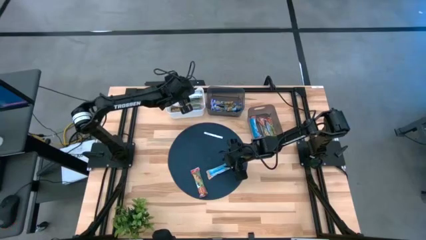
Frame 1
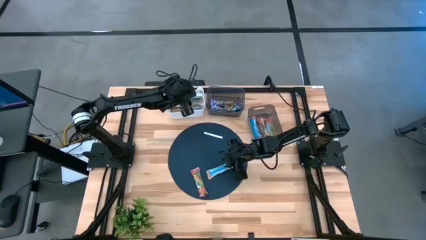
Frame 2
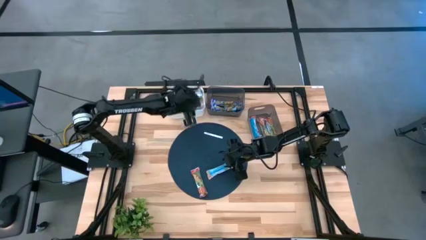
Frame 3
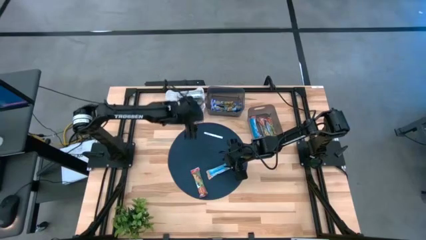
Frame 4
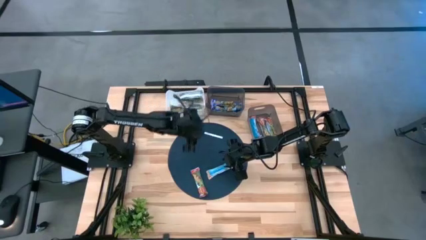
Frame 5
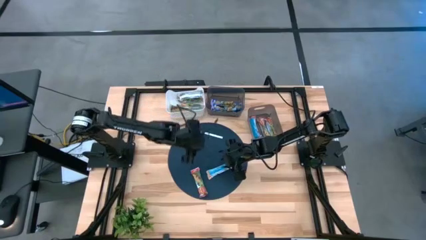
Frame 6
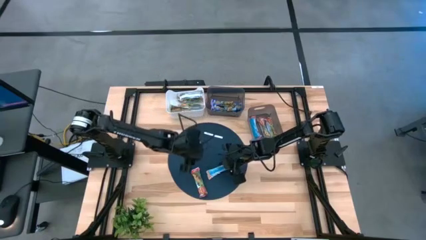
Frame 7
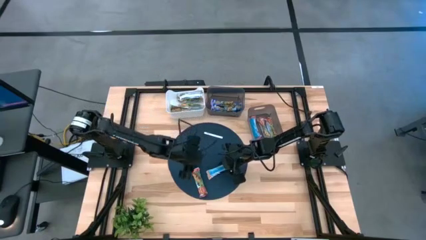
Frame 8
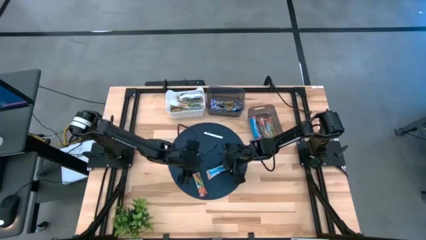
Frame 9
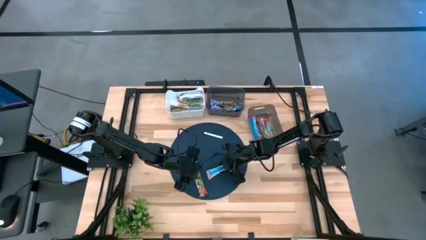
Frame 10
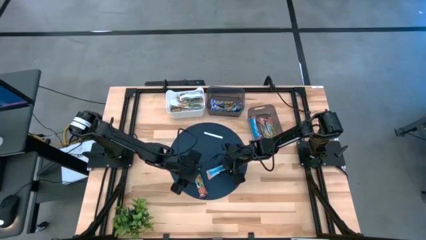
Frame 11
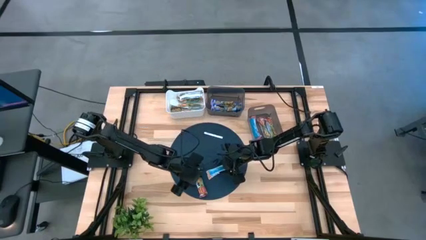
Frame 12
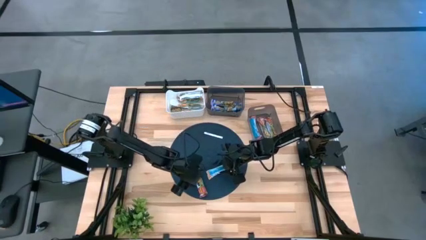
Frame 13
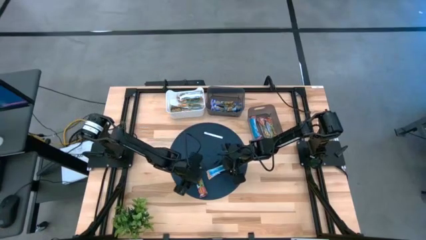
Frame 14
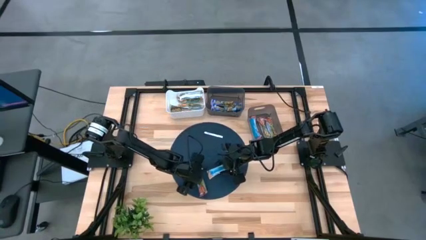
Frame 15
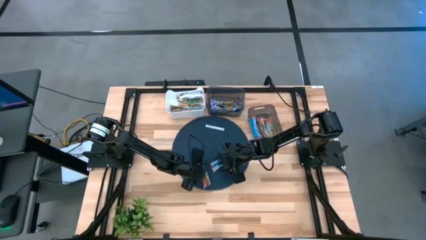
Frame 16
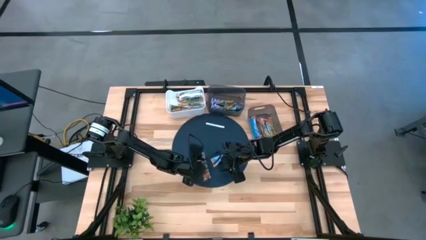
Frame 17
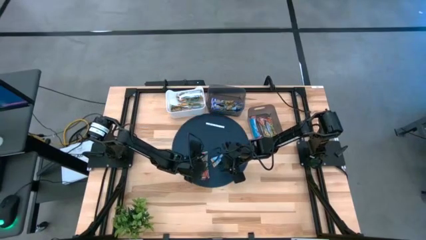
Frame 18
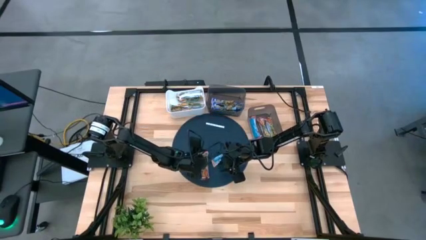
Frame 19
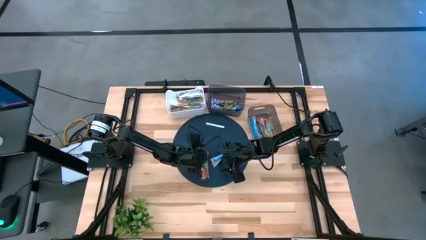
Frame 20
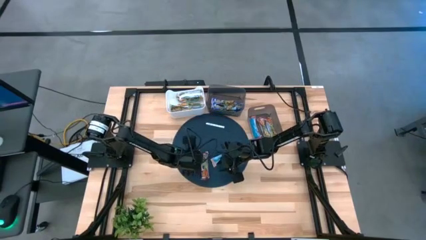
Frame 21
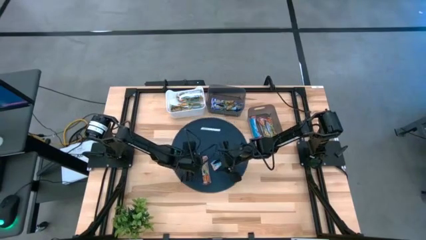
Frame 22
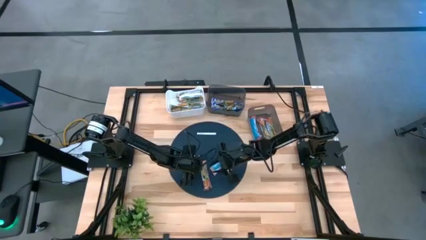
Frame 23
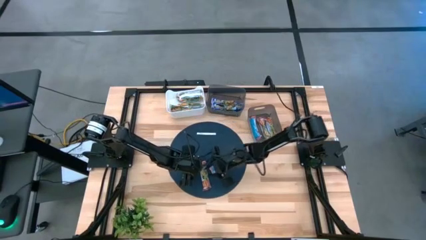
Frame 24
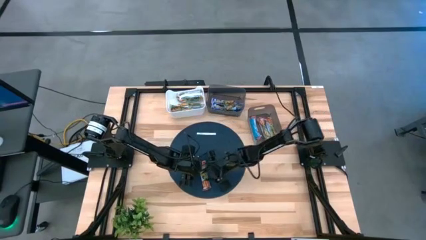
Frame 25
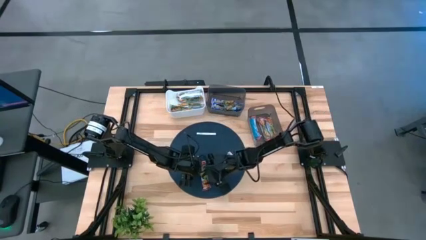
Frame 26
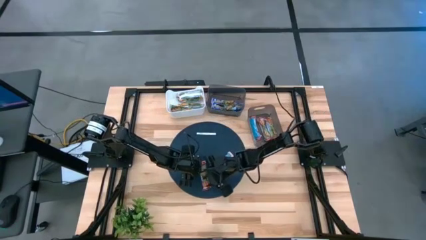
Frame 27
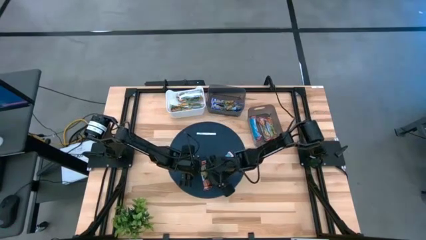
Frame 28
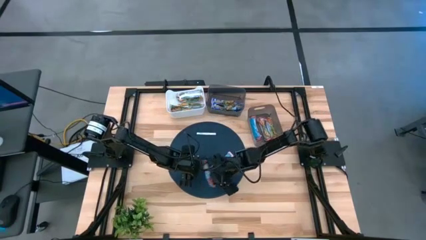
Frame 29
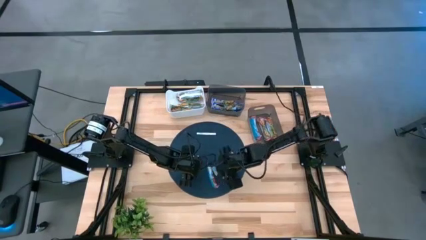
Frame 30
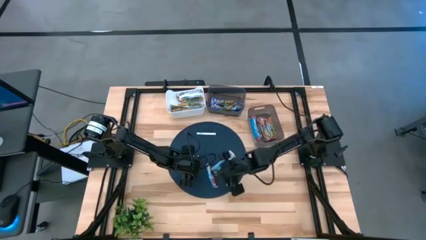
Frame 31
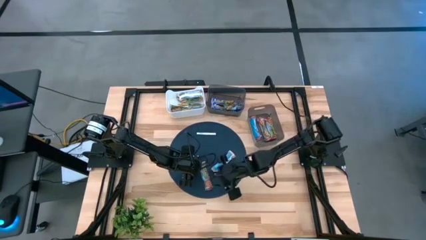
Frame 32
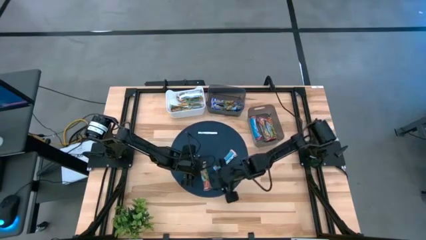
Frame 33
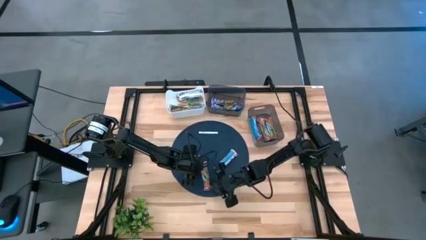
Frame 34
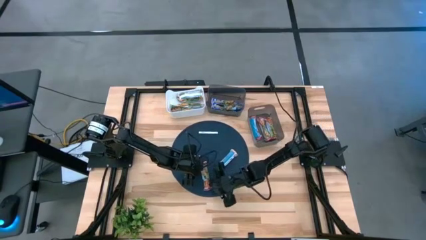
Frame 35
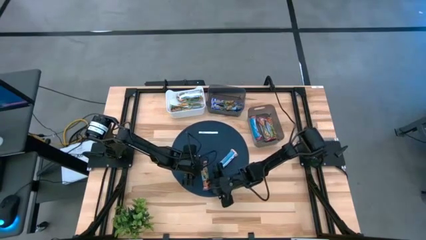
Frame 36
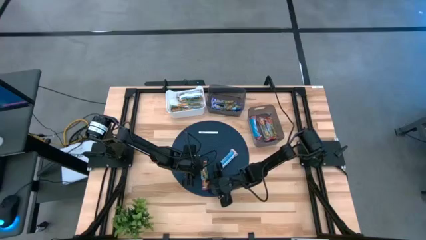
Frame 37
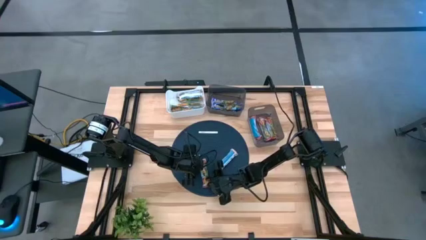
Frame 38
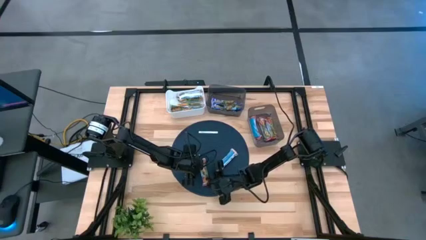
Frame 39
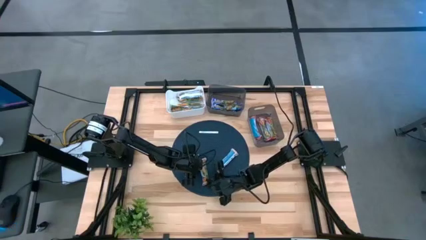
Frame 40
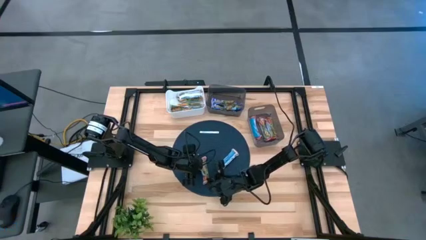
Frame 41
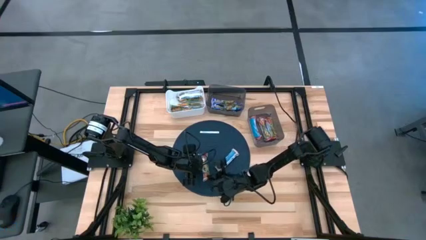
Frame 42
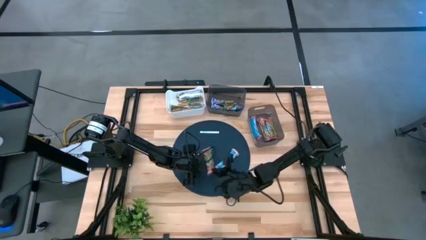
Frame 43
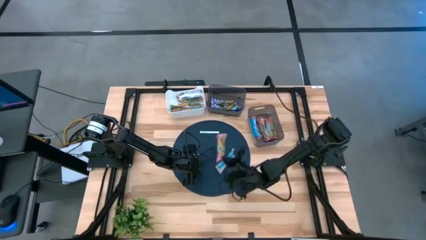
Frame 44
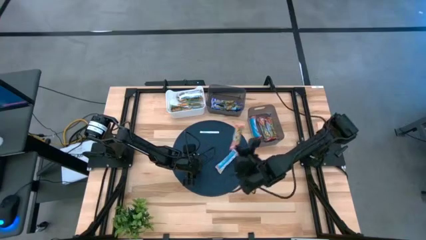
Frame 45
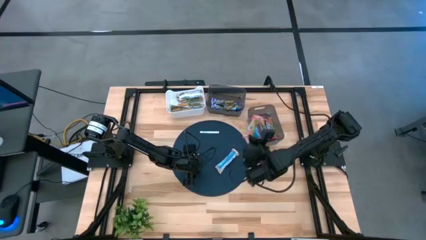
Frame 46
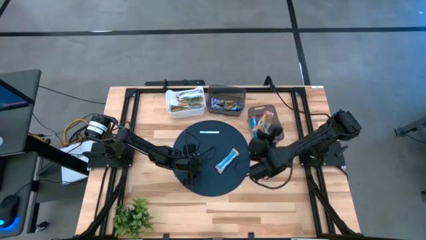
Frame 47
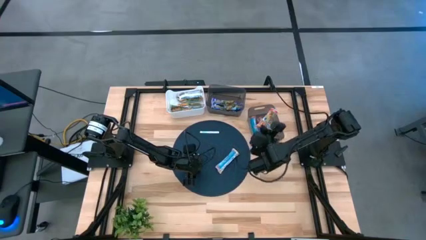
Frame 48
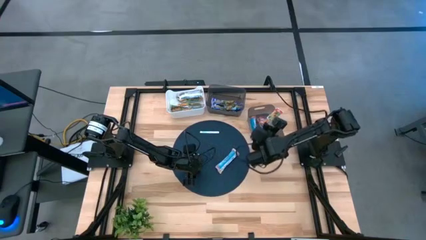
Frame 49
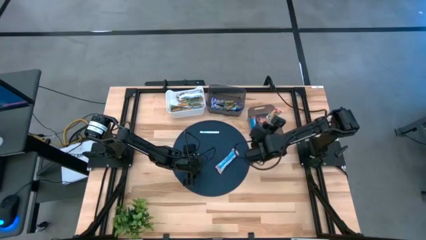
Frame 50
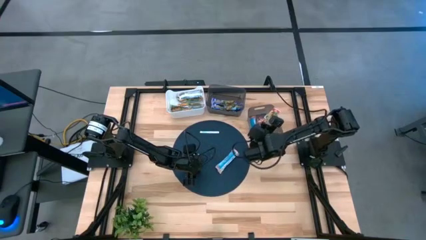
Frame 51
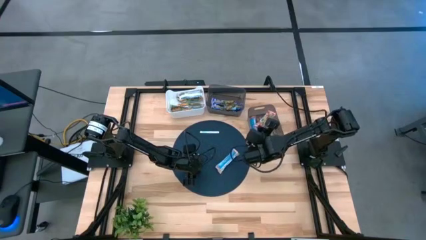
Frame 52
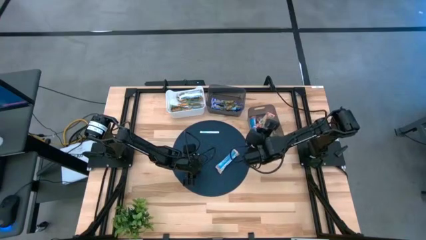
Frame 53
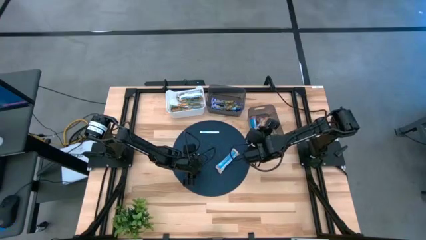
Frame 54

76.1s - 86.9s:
Task: Pick and place Granola Bars by type
Put the red granola bar into the bottom black bin

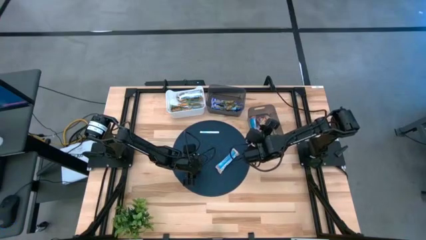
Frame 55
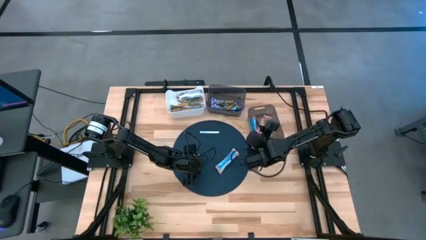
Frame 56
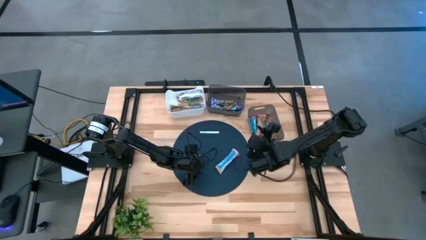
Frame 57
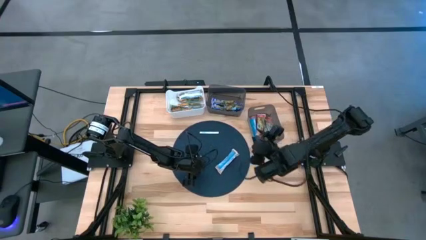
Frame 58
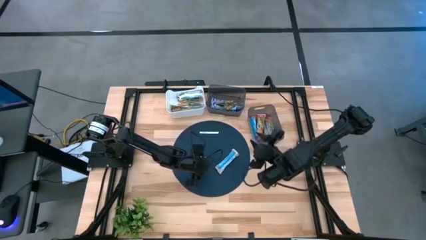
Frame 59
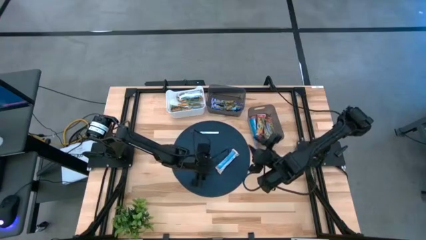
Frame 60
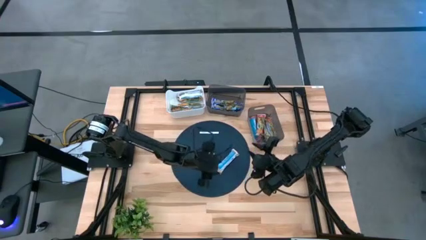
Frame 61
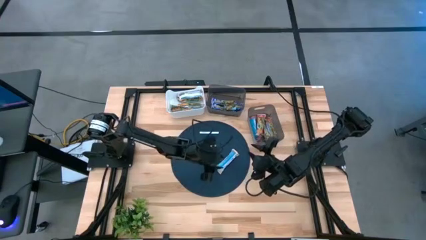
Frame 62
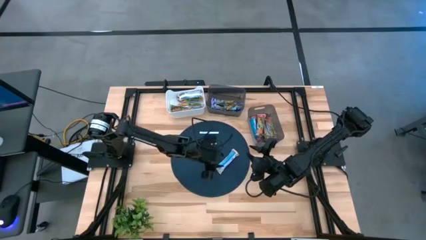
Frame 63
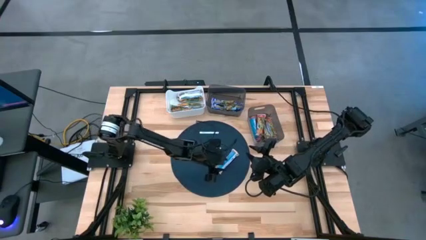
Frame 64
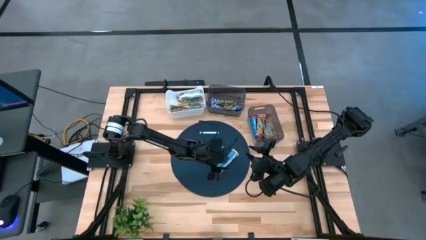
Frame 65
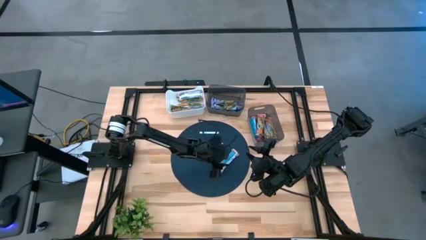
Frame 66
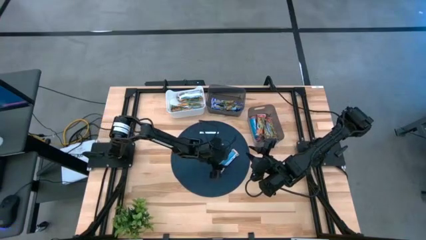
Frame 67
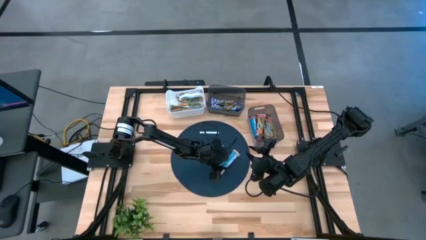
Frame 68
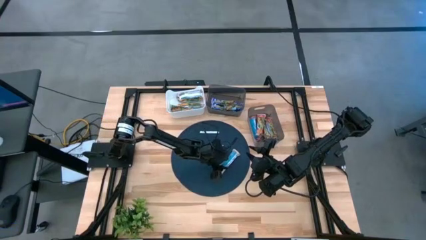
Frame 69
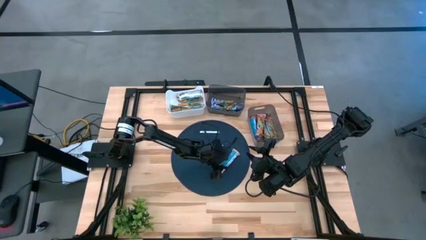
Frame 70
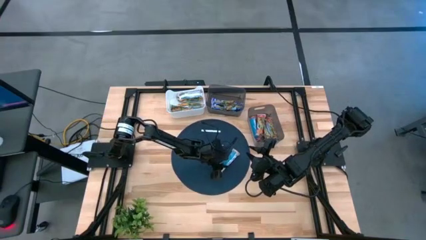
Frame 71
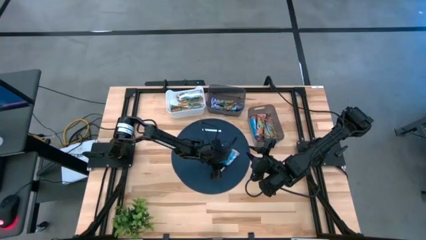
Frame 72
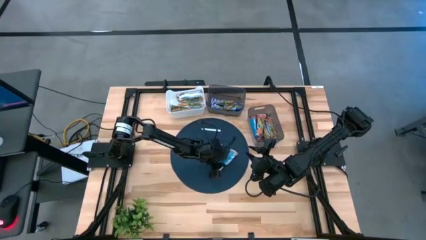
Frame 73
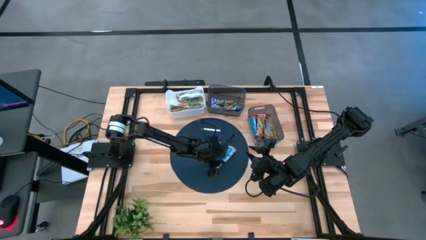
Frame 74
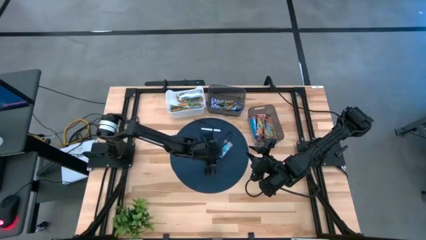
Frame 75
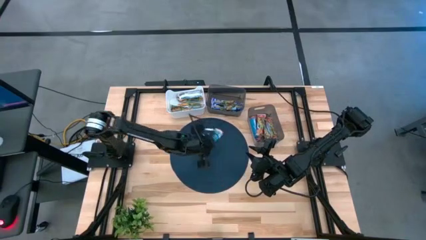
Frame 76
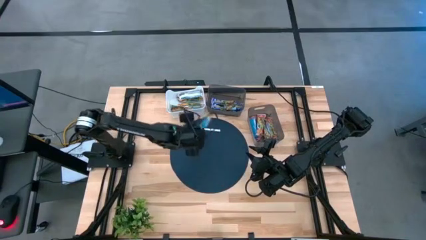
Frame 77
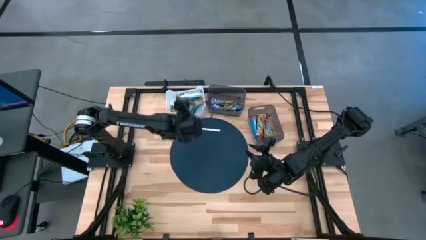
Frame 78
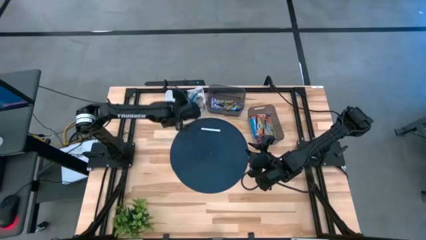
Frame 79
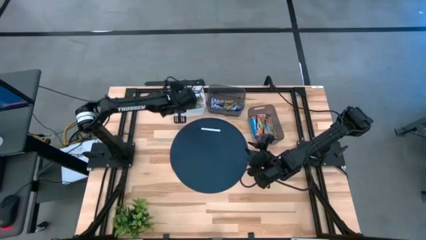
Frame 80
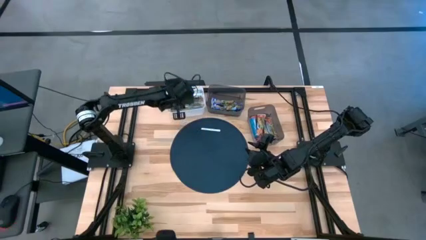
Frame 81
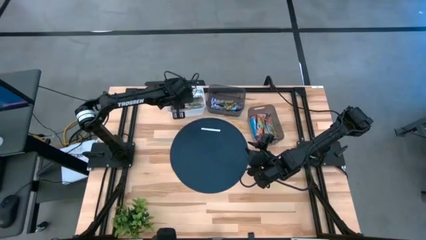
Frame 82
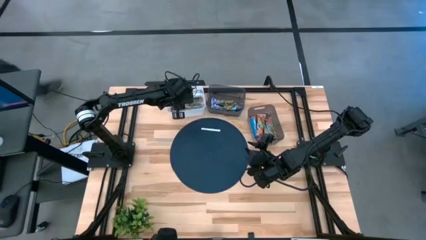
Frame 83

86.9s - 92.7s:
Put the yellow granola bar into the white bin
